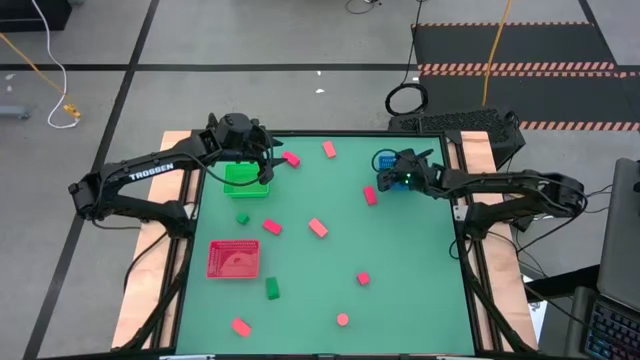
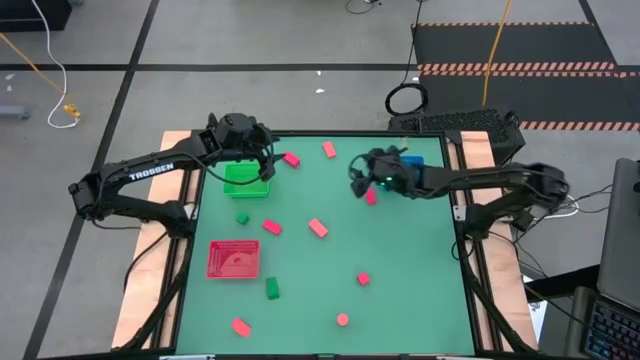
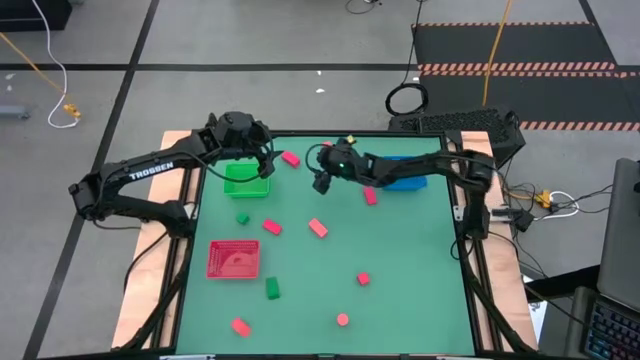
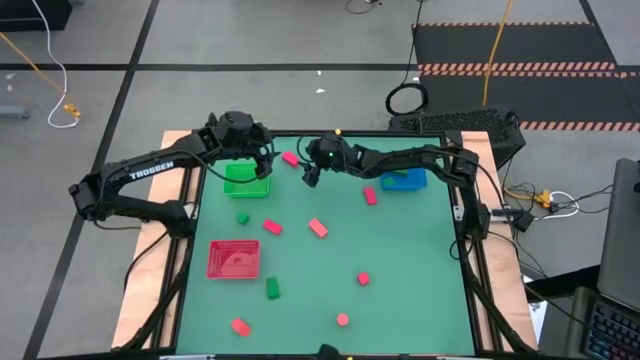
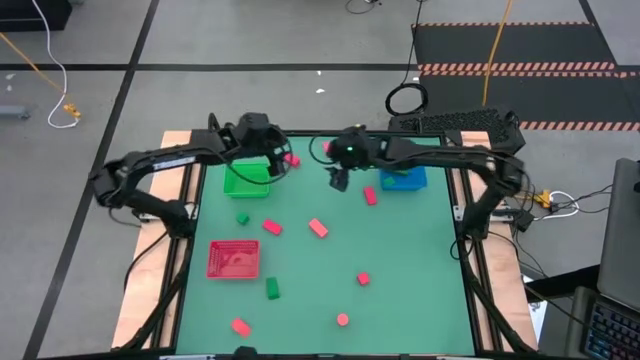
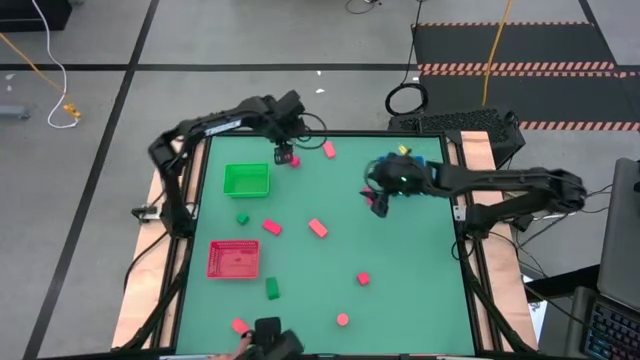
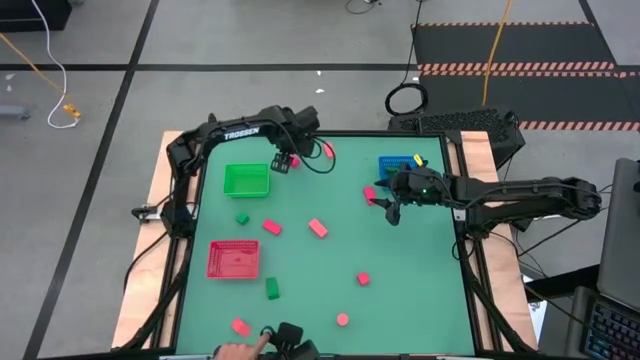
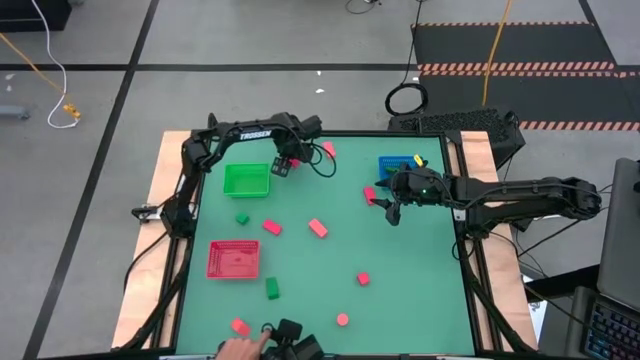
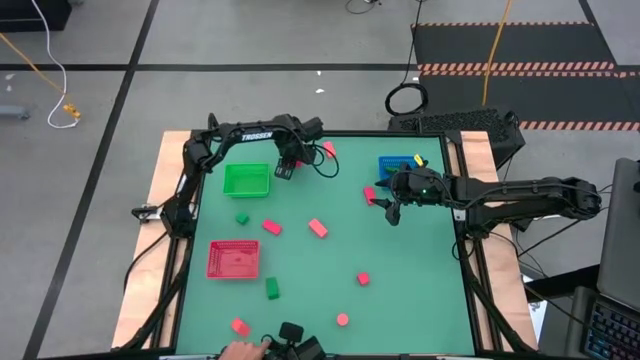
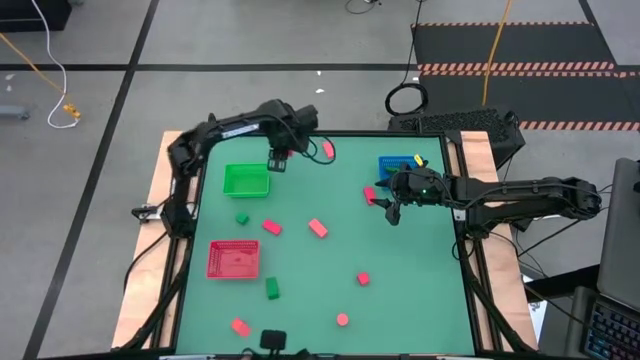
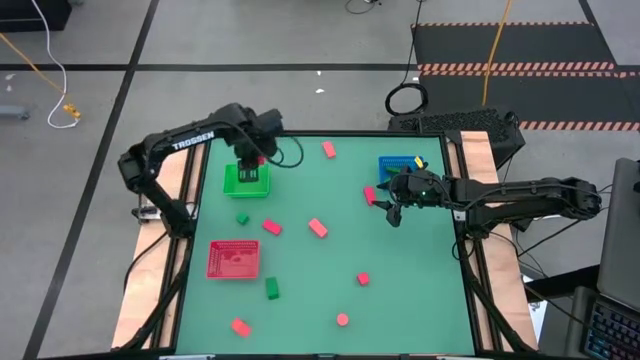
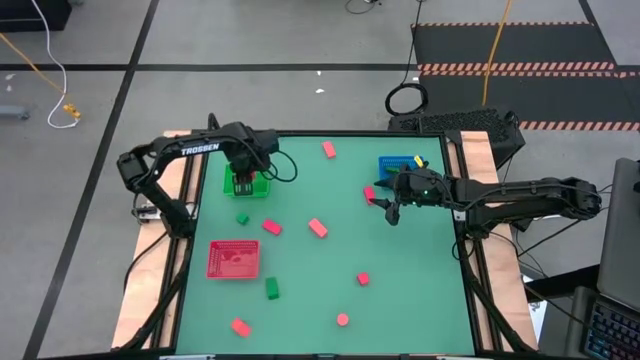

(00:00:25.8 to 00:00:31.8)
Task: Sort & place blocks by color
Put the red block into the green bin

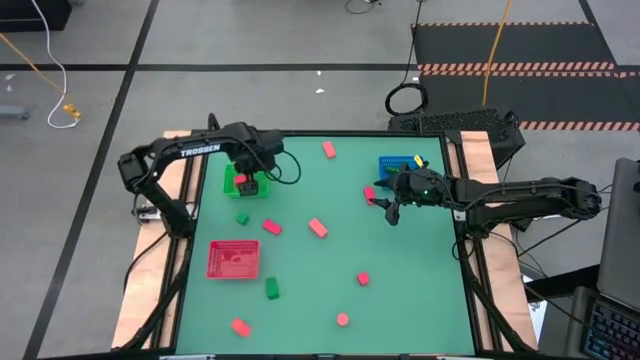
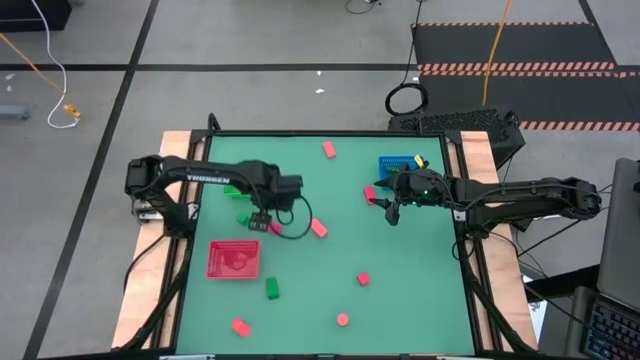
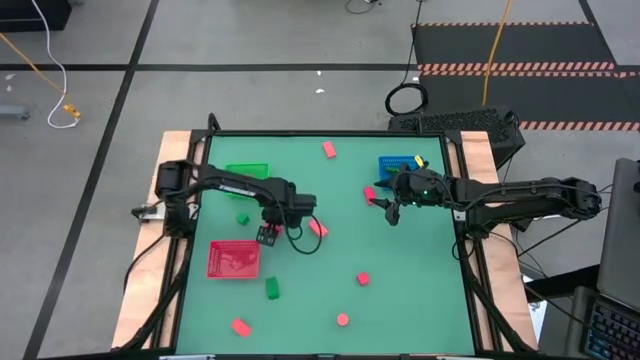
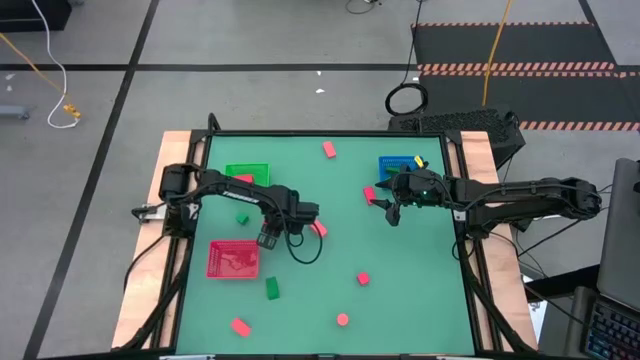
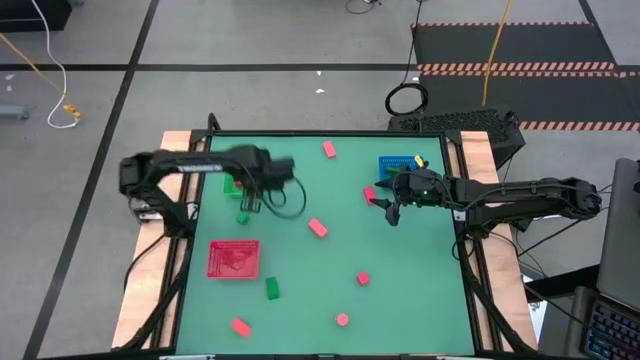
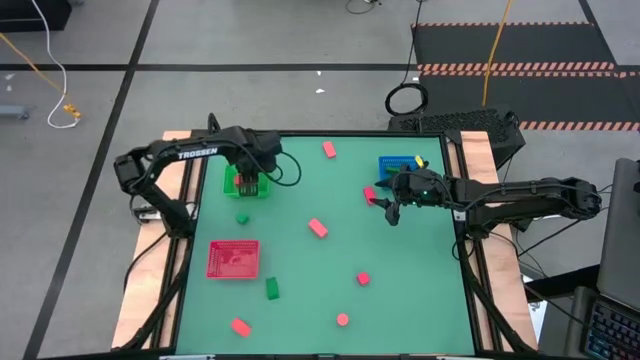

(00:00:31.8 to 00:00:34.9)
Put the red block into the green bin

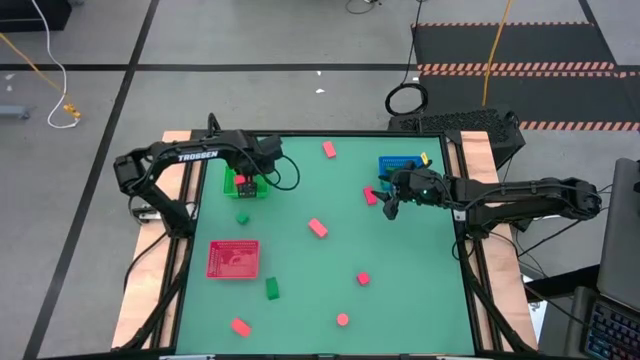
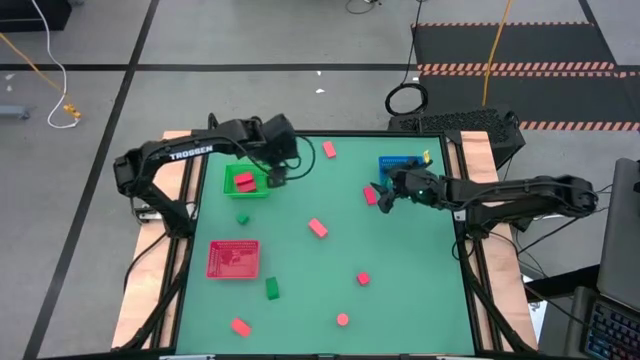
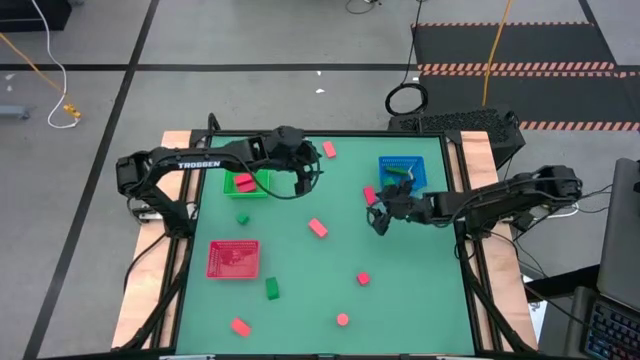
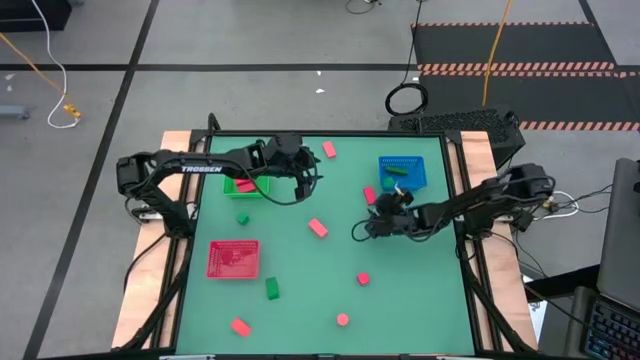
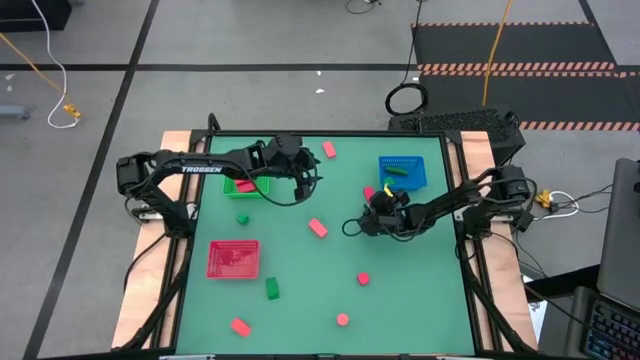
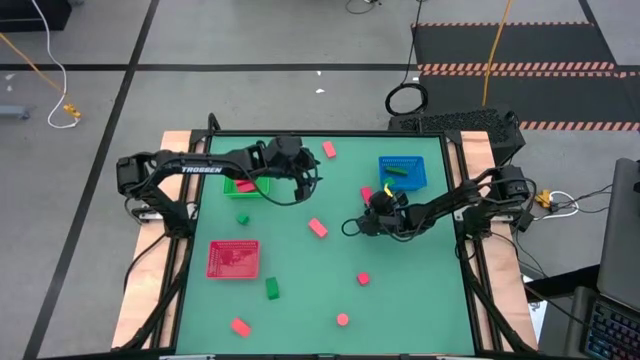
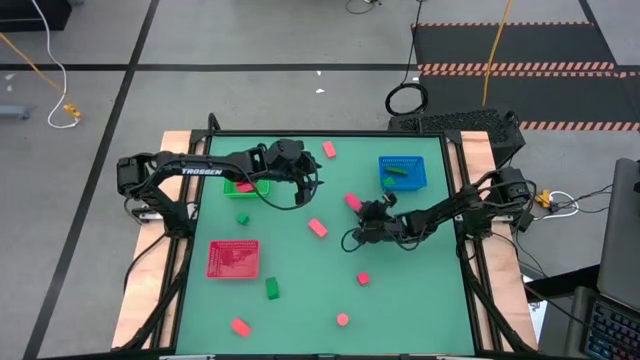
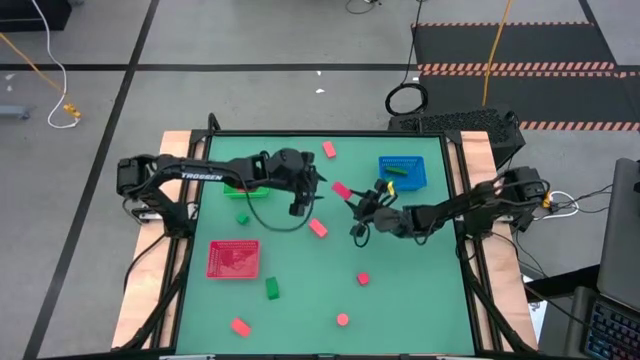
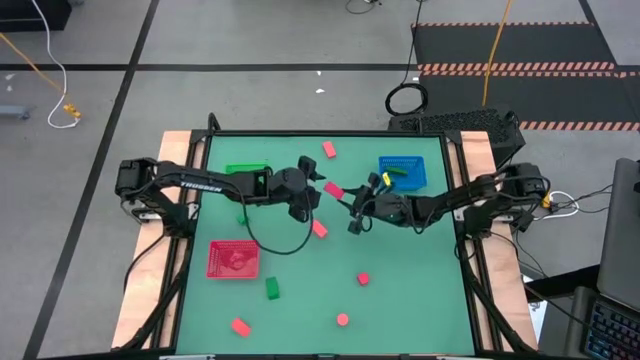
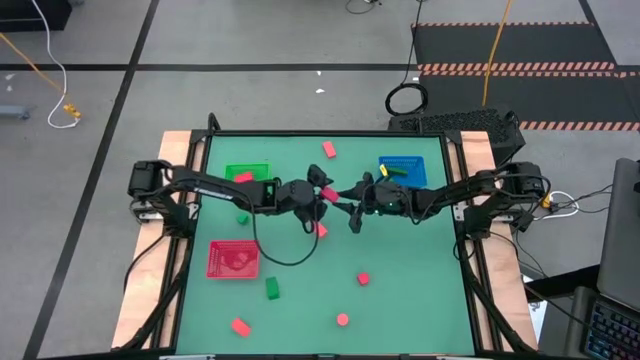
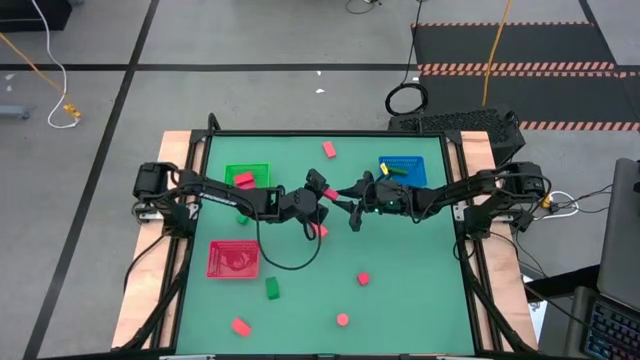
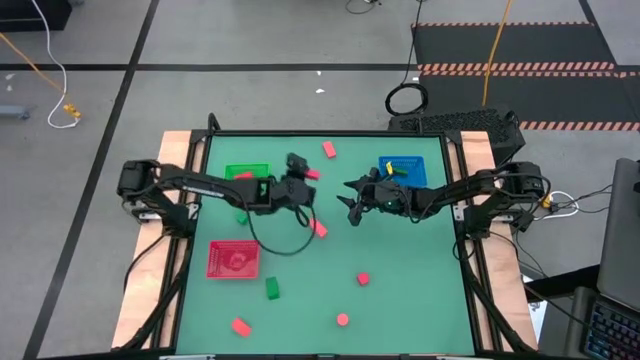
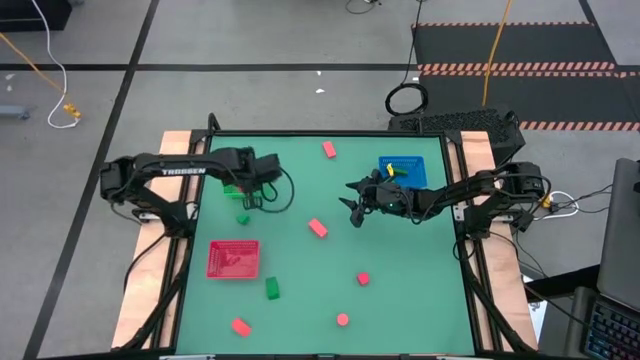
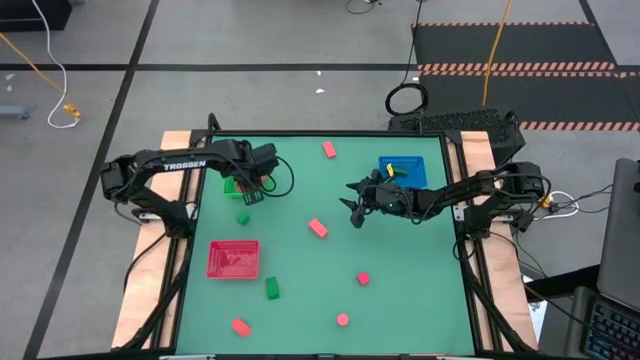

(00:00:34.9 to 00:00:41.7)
Put the red block into the green bin

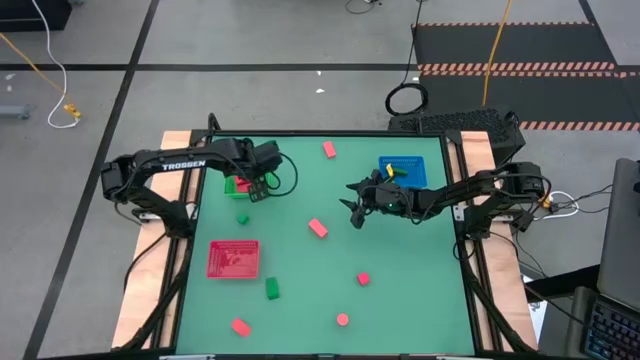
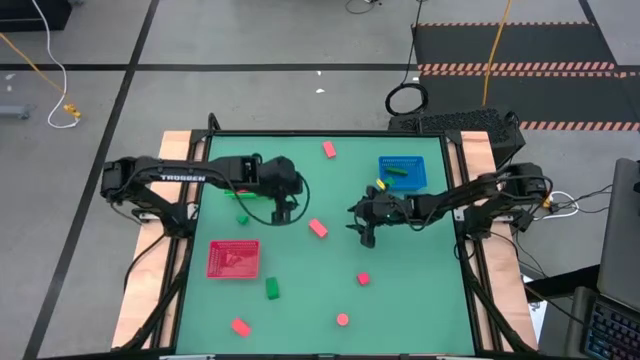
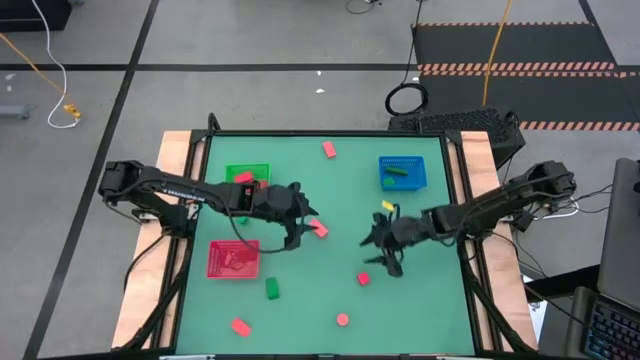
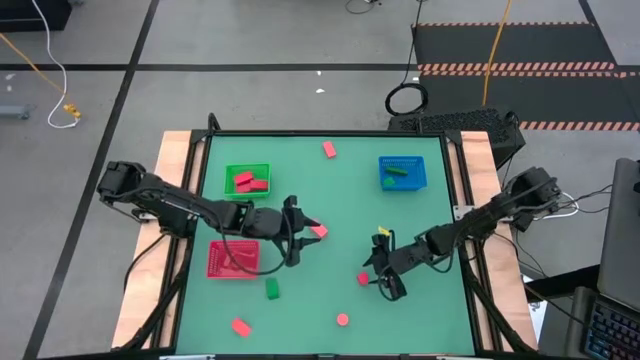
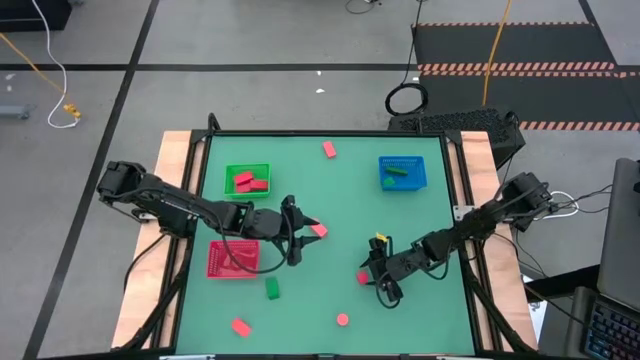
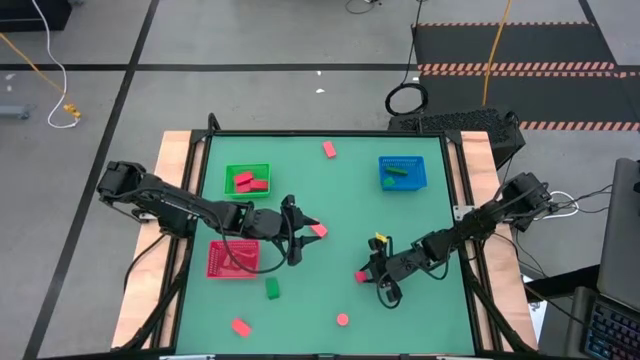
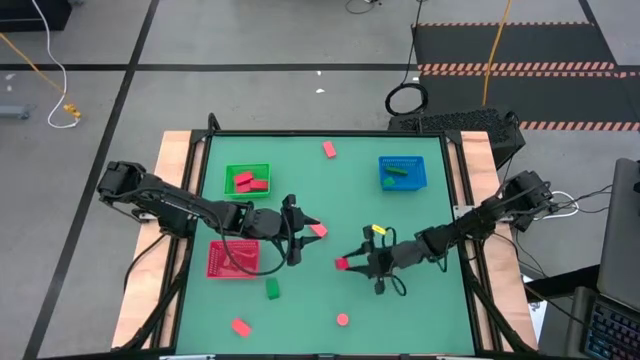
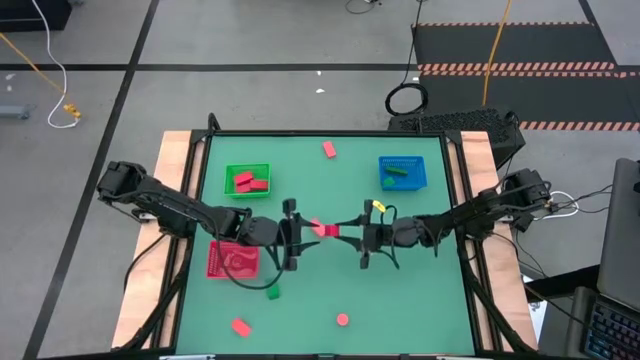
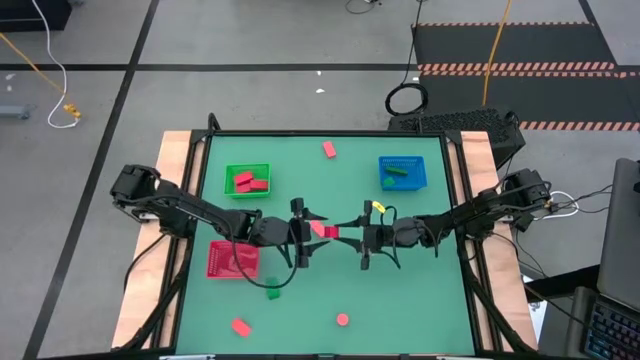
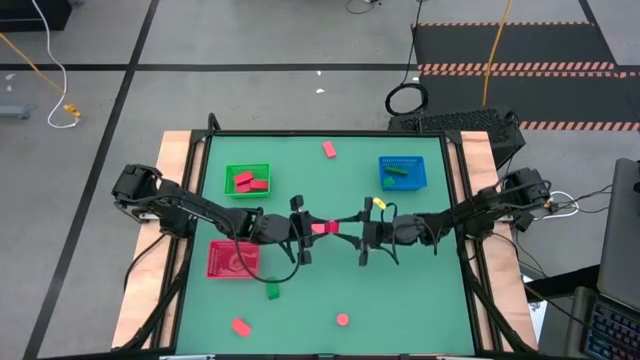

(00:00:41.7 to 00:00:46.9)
Put the red block into the green bin
